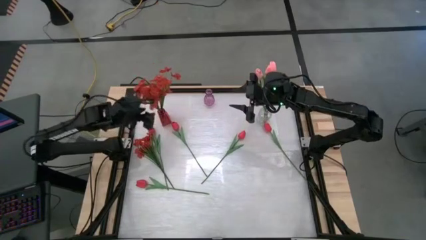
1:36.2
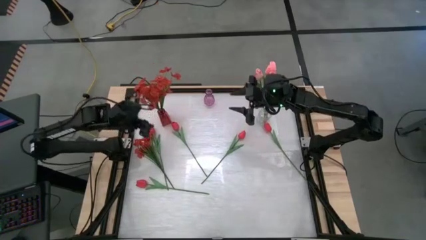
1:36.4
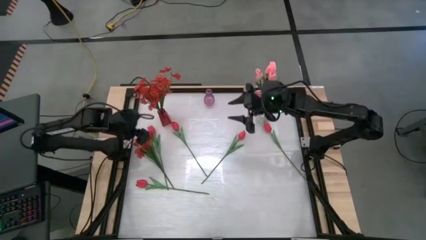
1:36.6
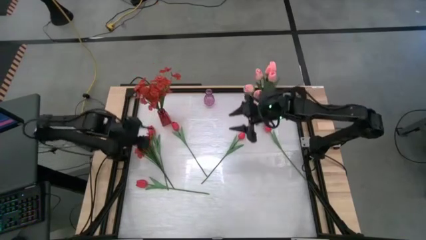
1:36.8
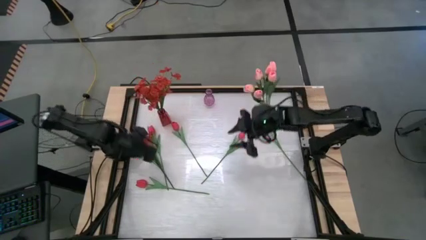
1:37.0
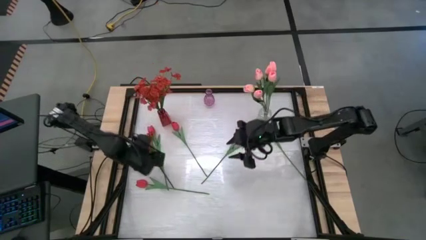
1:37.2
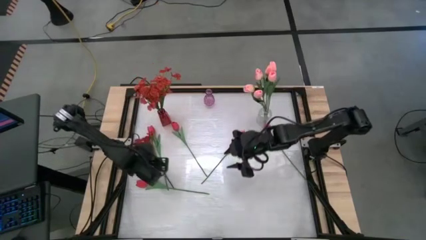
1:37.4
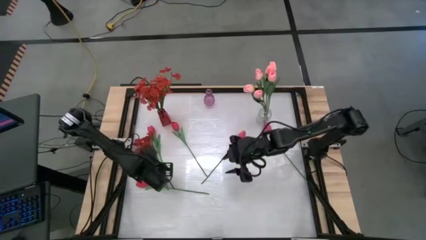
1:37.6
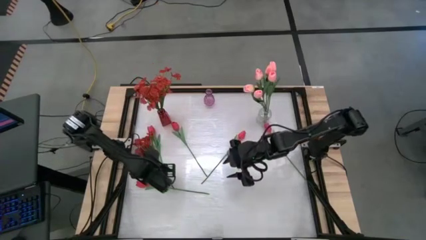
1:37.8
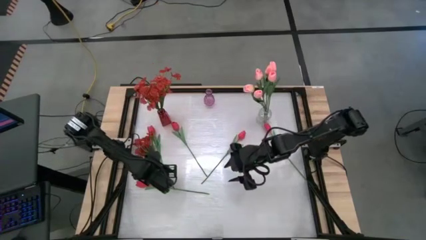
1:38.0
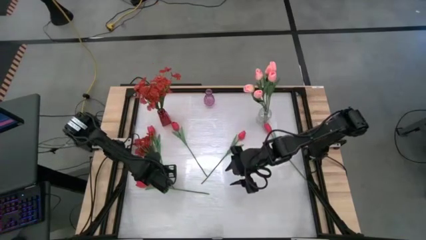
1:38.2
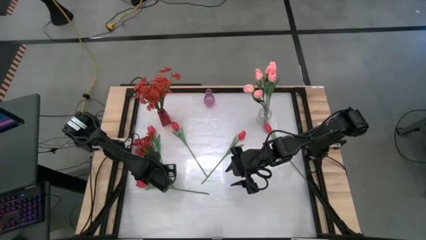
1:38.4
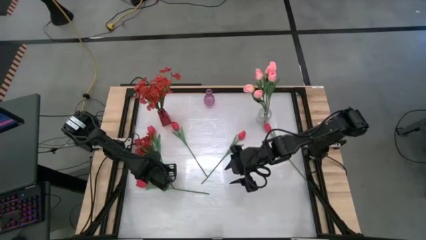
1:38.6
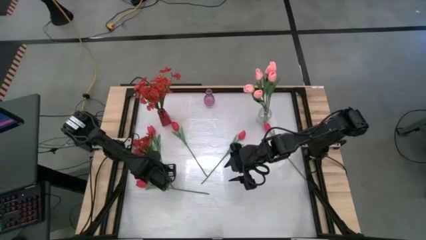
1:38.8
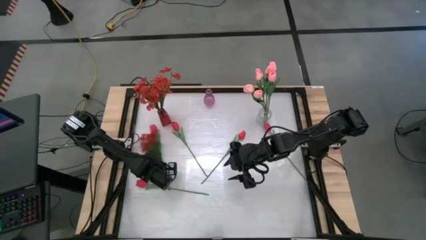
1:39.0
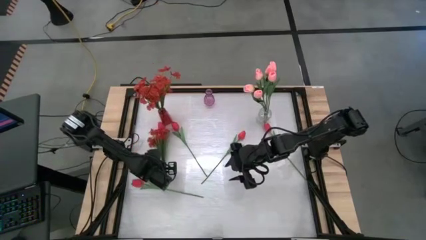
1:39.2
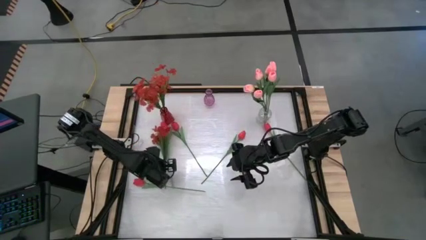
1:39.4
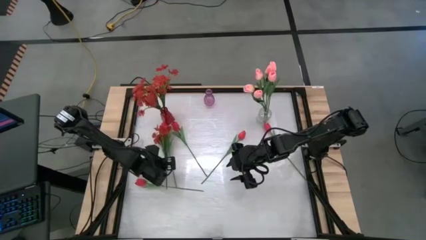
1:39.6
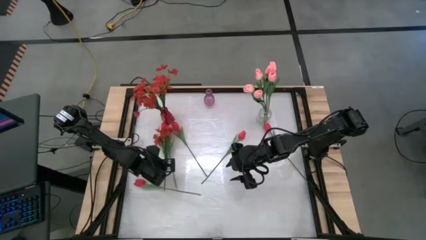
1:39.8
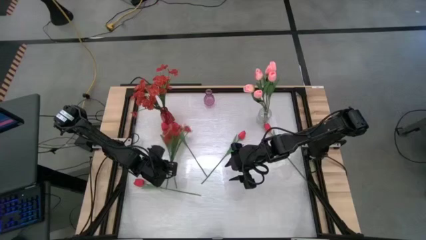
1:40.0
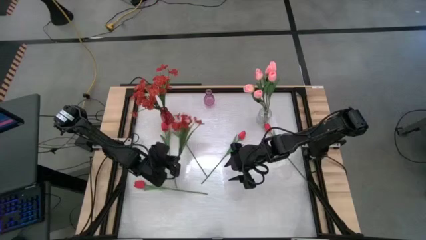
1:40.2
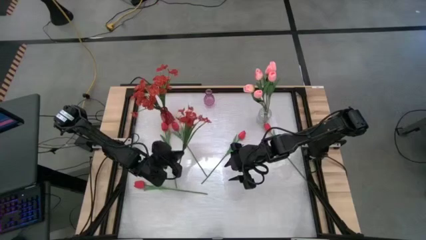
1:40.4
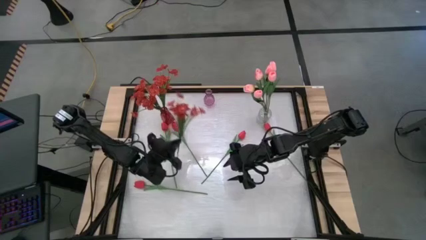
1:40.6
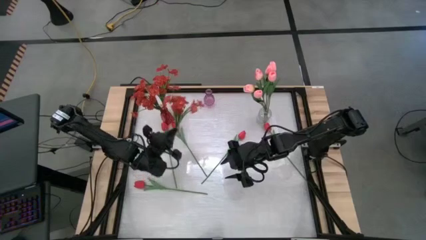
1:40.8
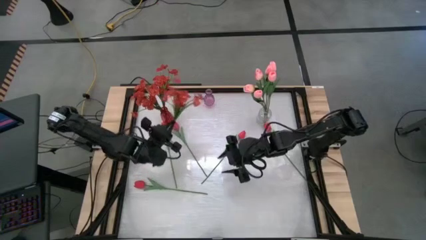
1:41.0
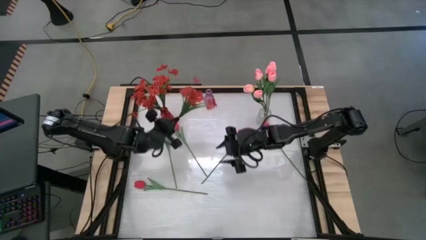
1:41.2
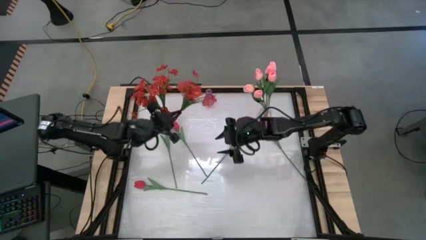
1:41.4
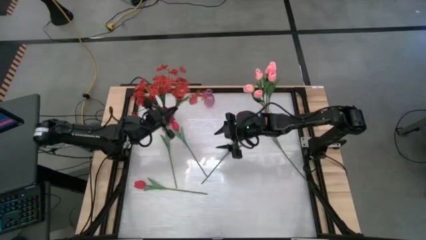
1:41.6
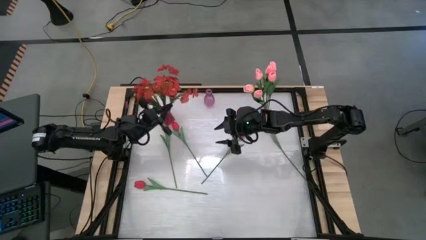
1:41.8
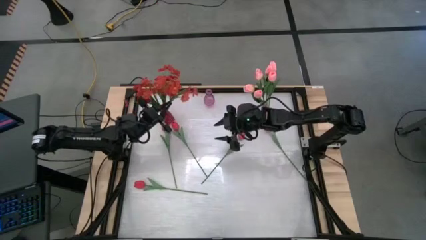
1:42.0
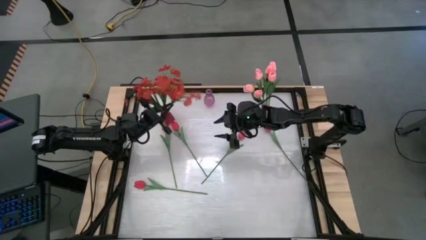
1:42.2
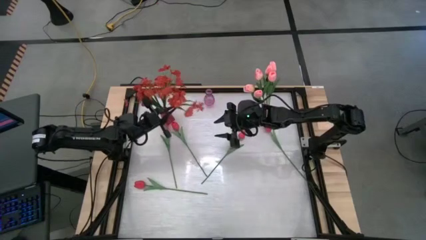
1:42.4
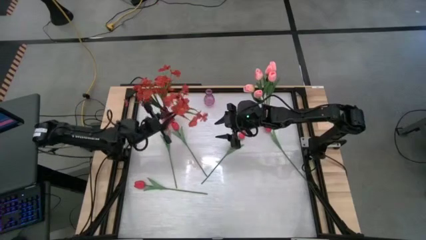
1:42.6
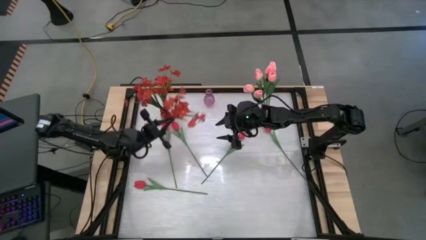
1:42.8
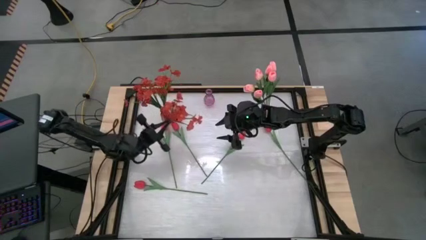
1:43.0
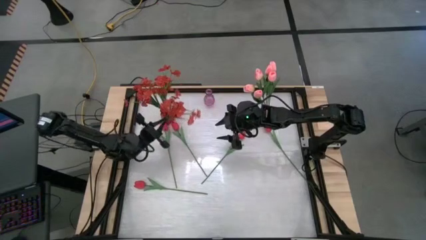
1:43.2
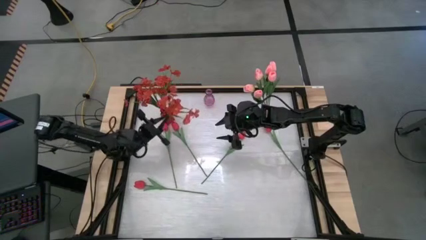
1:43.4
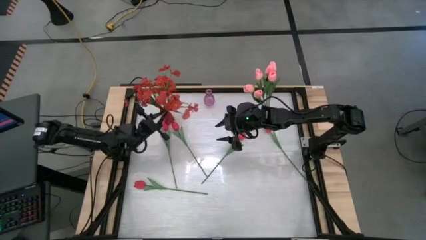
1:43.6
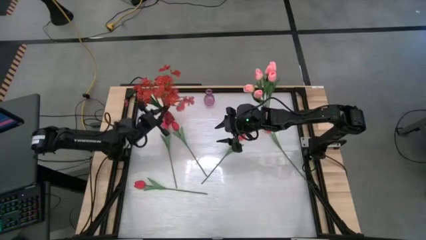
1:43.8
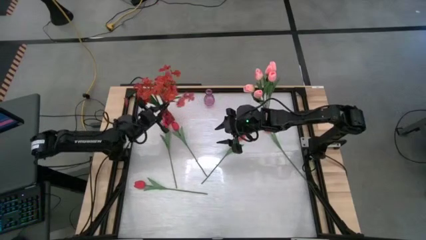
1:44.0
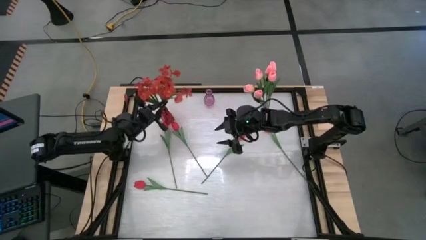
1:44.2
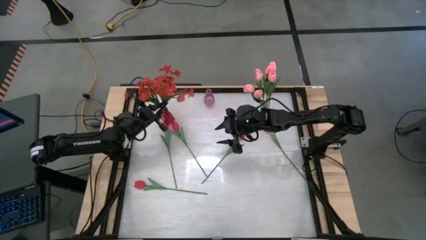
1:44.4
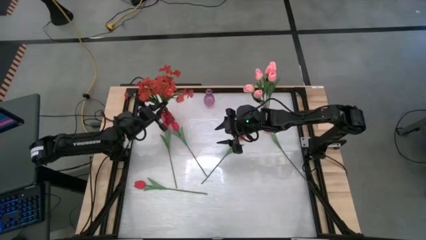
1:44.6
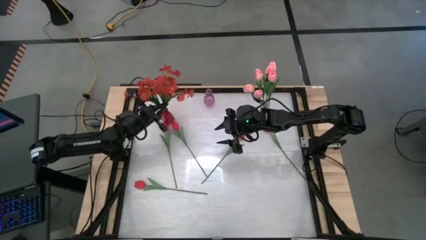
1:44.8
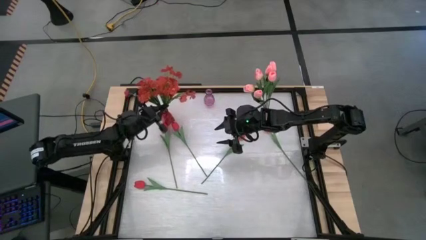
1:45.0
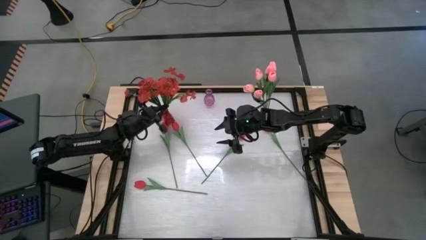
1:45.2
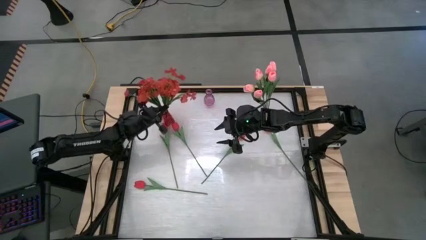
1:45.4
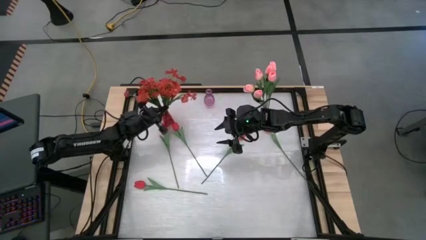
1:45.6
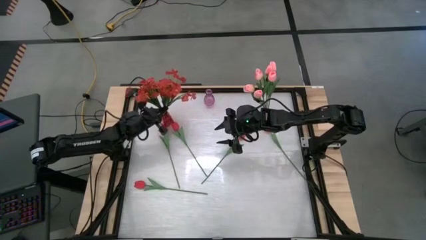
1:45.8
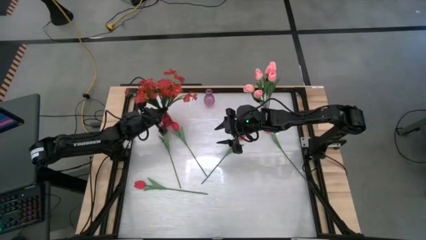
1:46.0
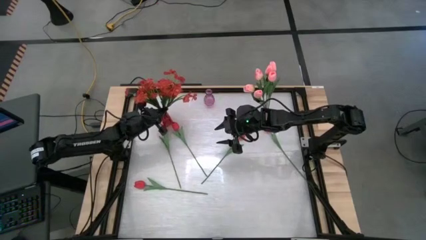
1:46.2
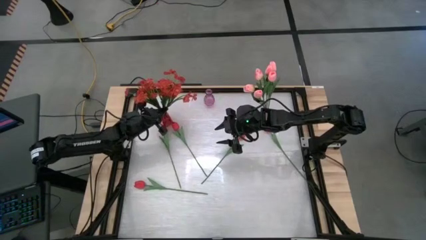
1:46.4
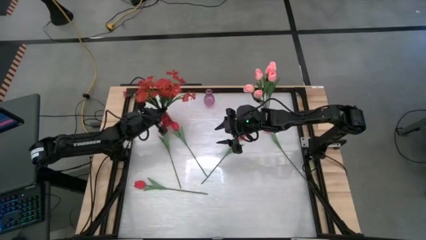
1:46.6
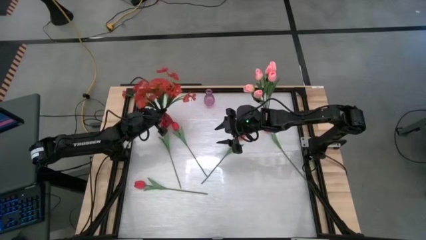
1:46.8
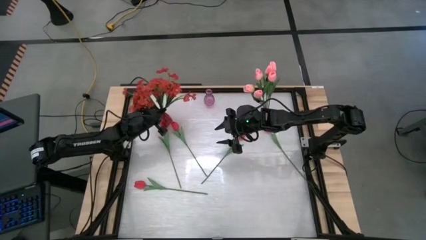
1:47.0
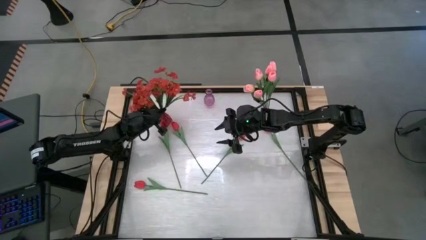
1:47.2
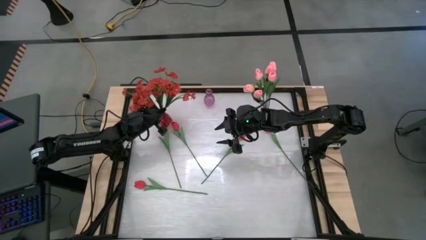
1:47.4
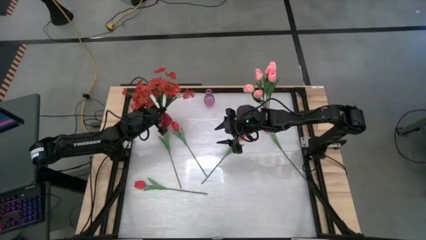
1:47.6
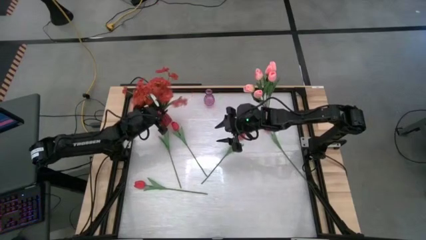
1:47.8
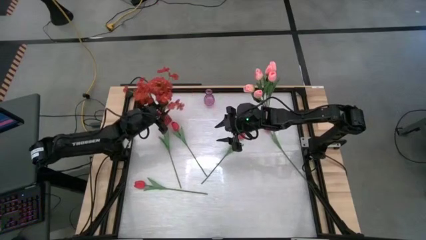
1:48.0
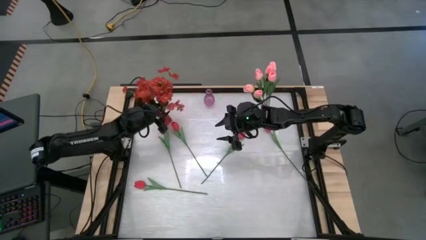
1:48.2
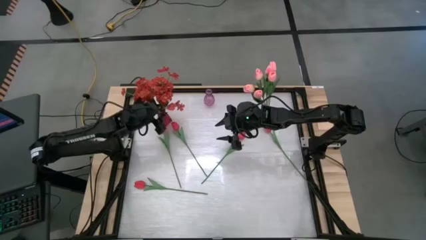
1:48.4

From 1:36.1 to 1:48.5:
Task: Sort flowers into vase by color
Put the red flowers into the red vase

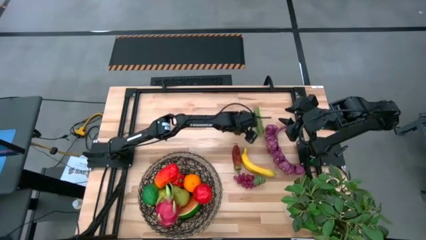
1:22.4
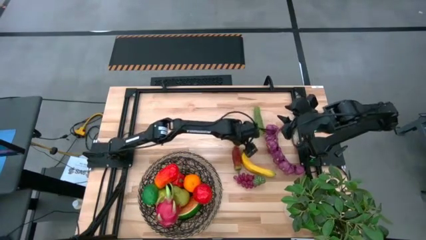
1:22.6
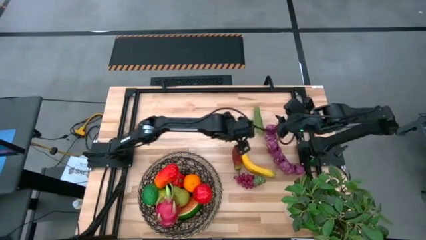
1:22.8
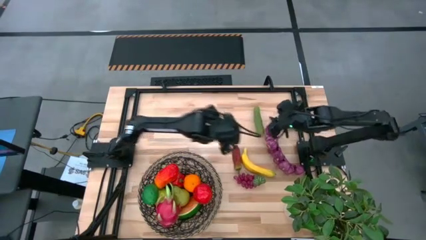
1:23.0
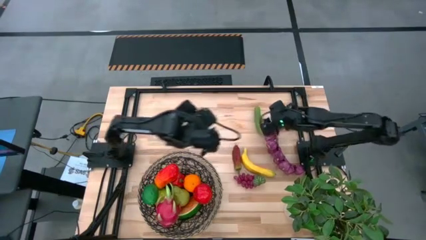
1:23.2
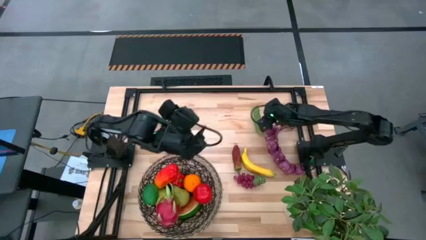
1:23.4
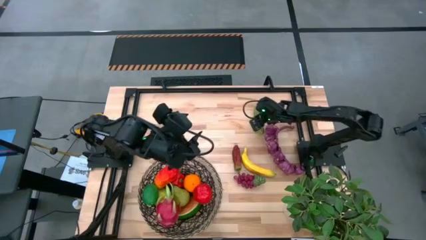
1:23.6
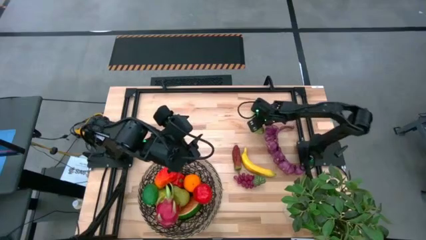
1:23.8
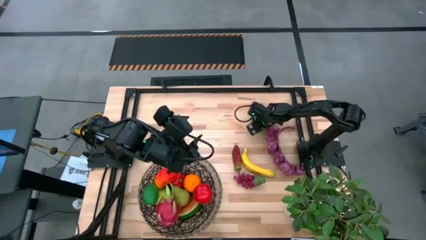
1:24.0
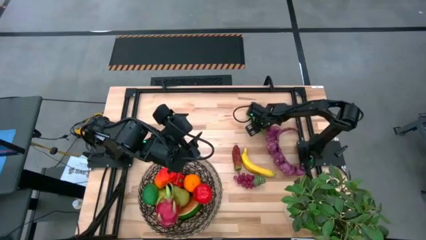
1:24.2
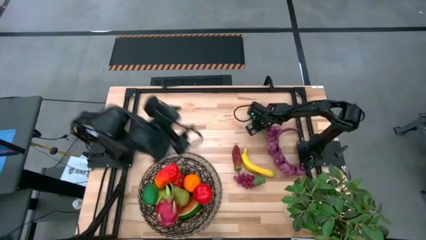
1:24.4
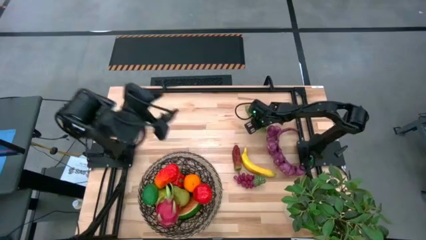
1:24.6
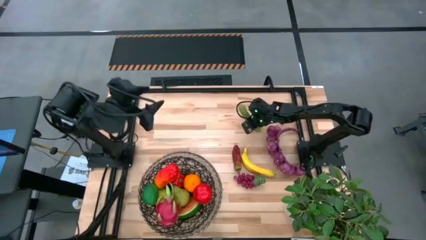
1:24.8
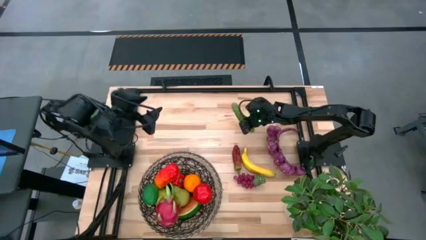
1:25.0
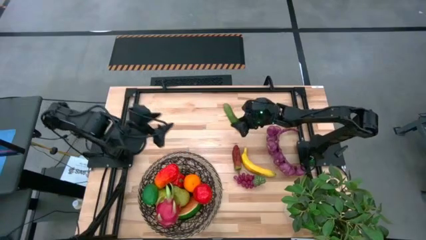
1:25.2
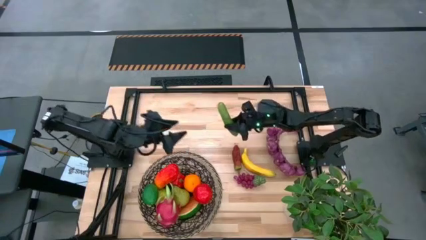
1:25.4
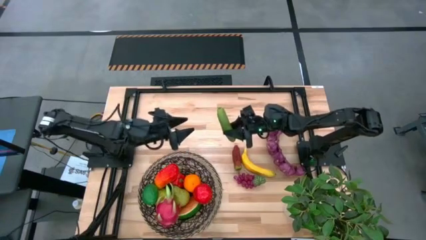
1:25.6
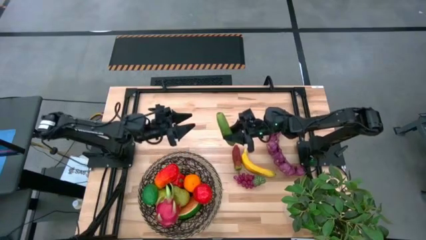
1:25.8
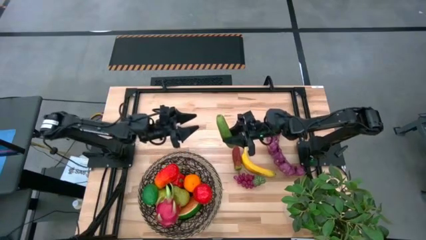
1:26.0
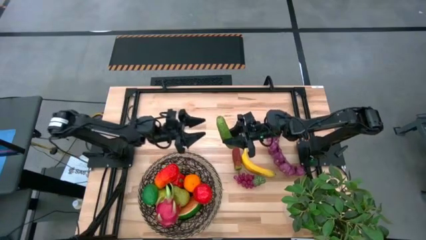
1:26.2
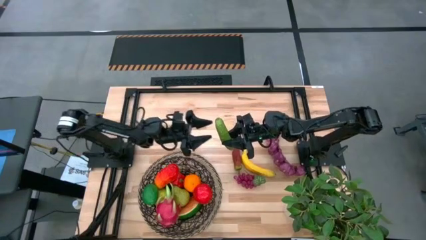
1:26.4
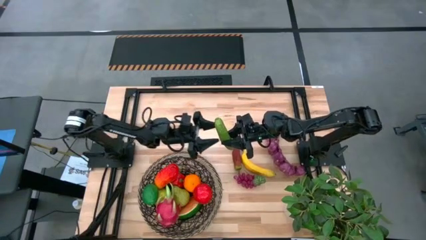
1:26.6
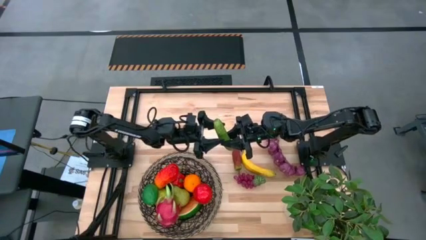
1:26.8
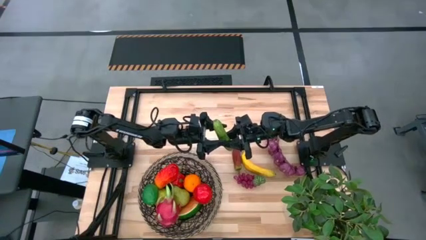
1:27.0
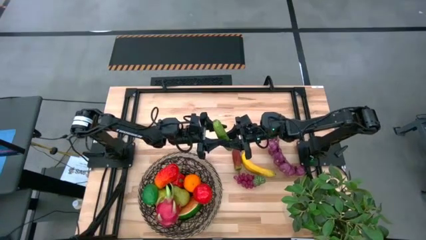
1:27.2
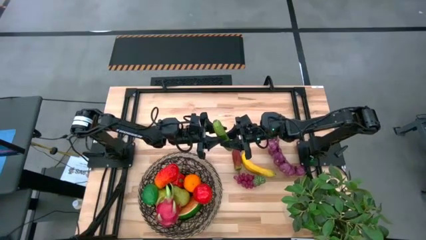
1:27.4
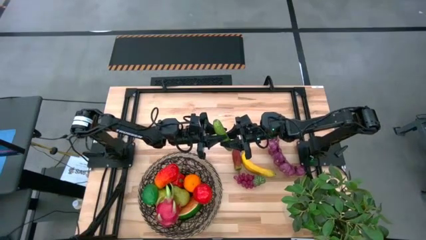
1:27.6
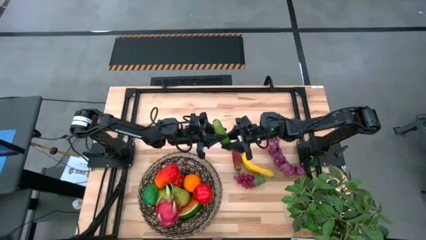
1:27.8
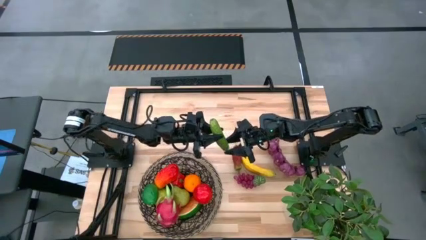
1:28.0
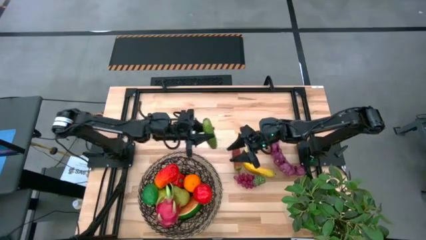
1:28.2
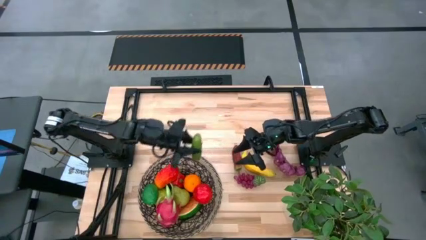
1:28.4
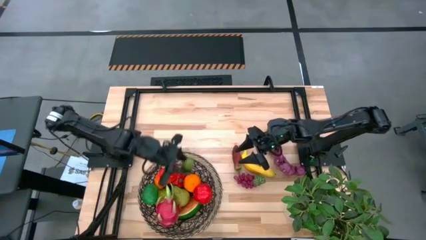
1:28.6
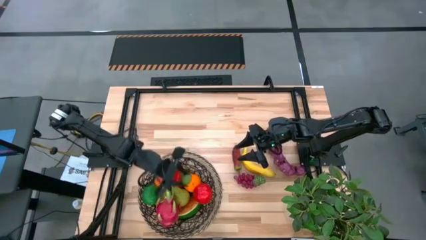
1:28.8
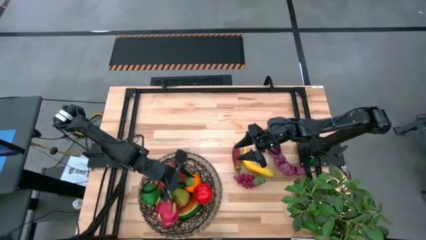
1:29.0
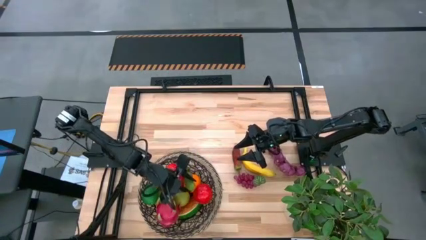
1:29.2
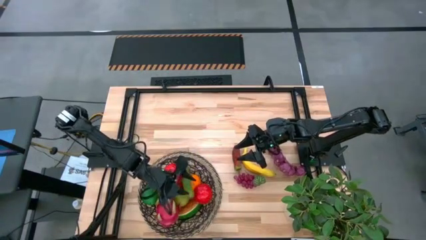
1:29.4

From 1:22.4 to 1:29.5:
Task: Build produce basket
Put the cucumber into the woven basket
